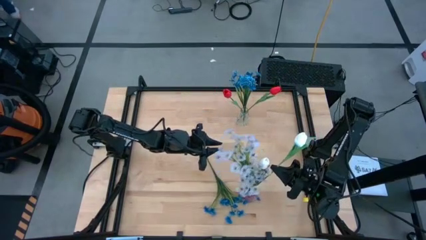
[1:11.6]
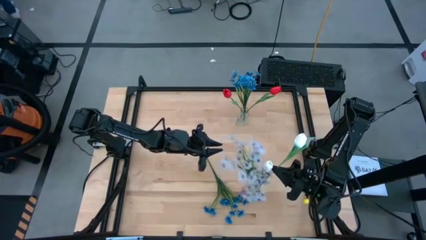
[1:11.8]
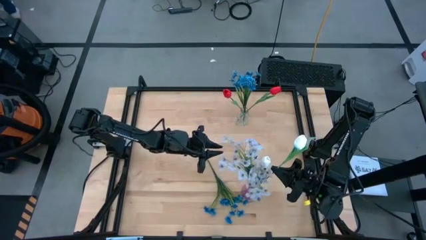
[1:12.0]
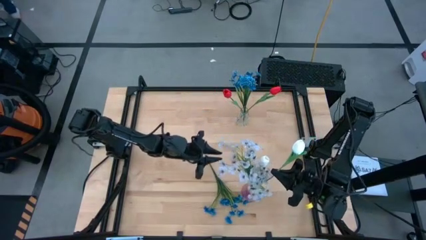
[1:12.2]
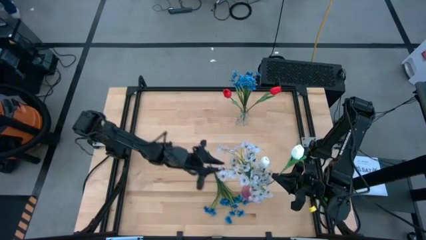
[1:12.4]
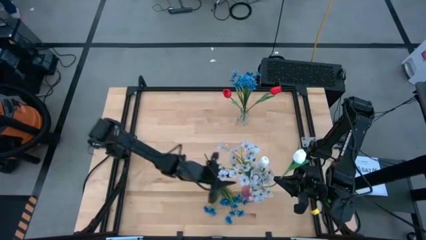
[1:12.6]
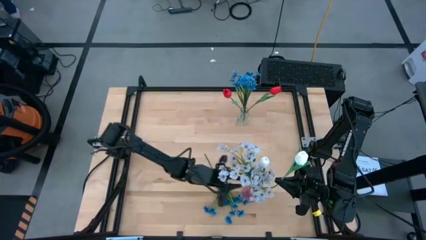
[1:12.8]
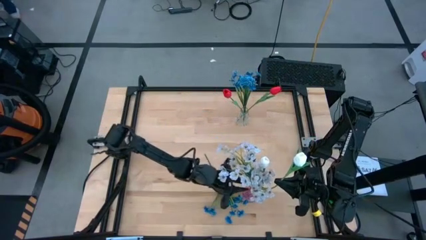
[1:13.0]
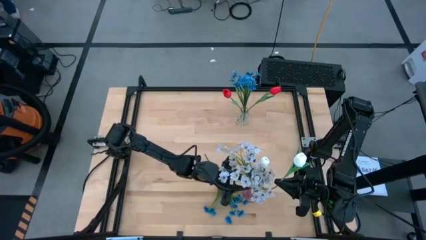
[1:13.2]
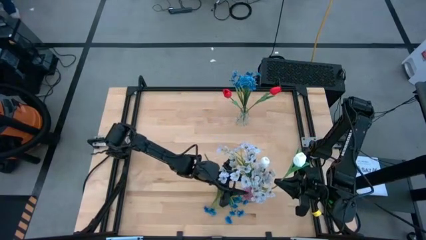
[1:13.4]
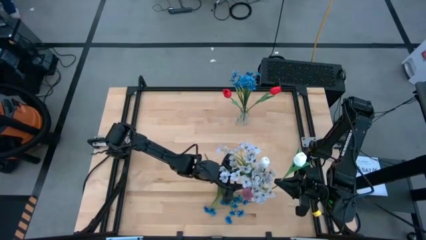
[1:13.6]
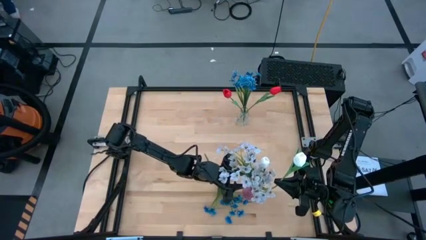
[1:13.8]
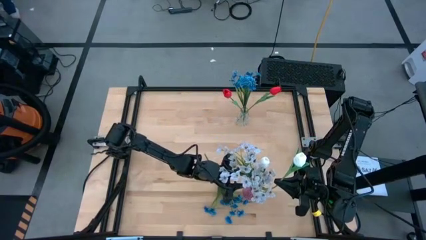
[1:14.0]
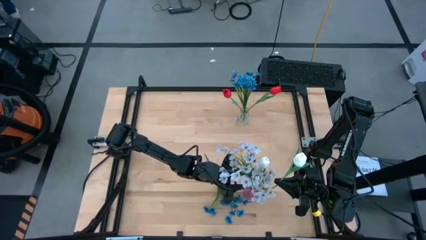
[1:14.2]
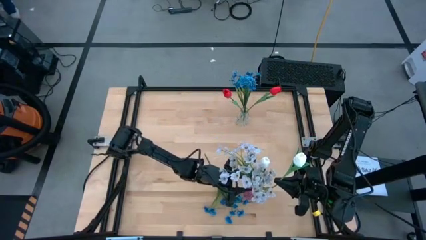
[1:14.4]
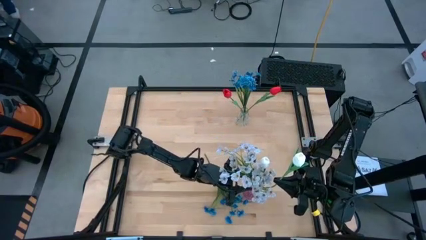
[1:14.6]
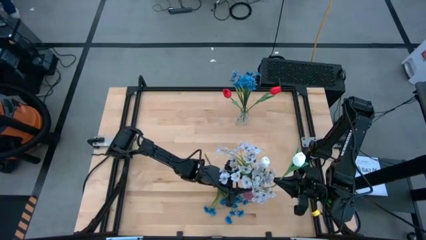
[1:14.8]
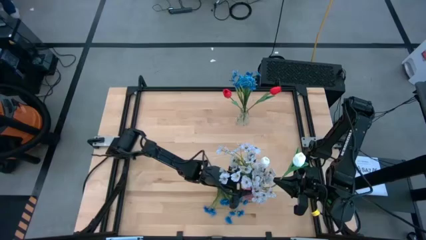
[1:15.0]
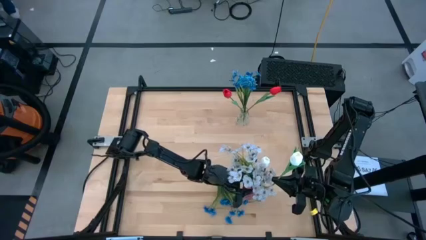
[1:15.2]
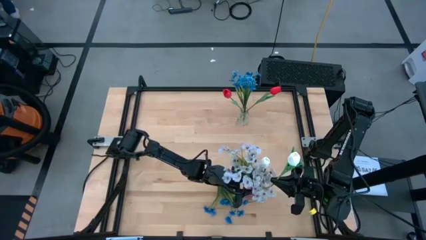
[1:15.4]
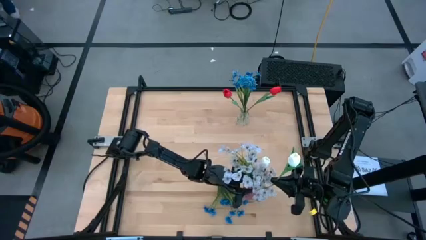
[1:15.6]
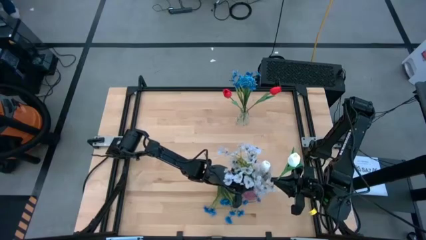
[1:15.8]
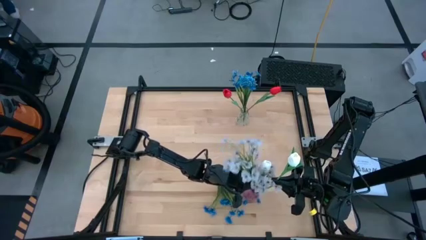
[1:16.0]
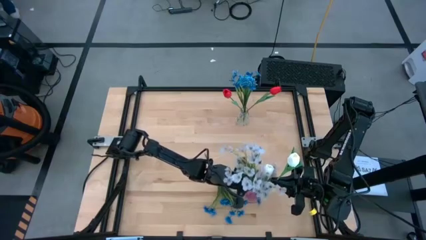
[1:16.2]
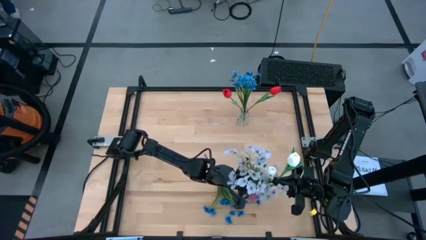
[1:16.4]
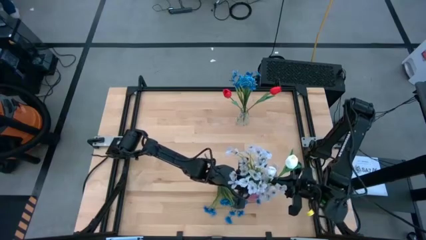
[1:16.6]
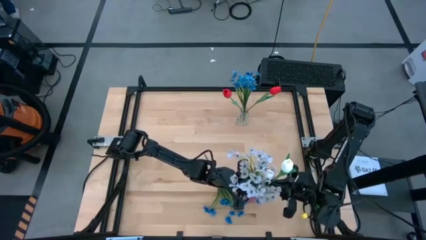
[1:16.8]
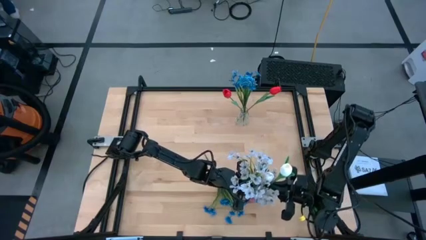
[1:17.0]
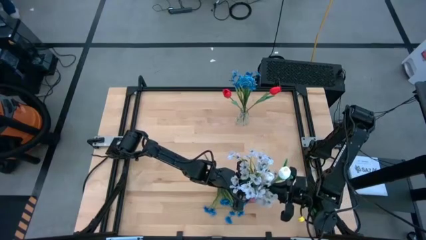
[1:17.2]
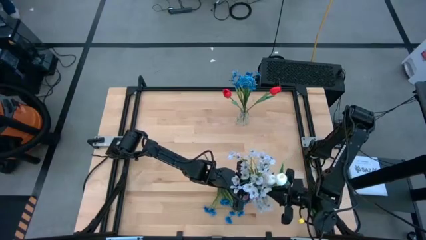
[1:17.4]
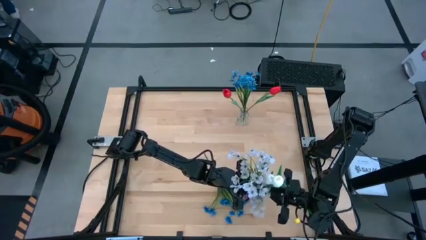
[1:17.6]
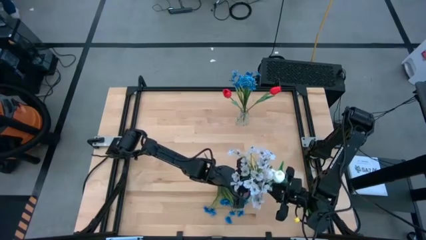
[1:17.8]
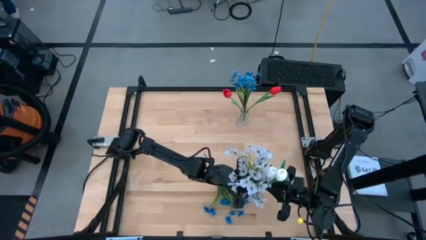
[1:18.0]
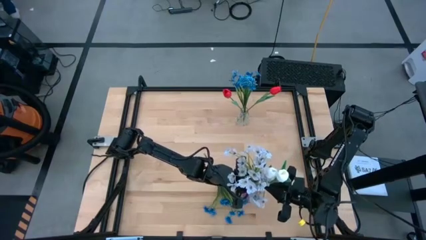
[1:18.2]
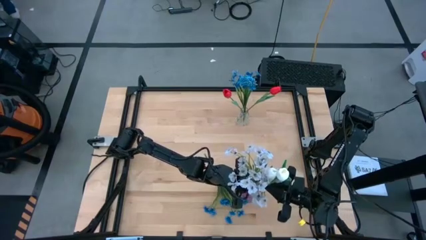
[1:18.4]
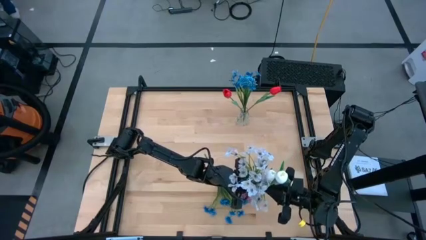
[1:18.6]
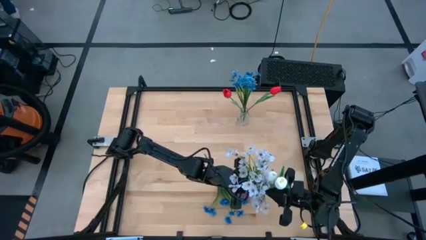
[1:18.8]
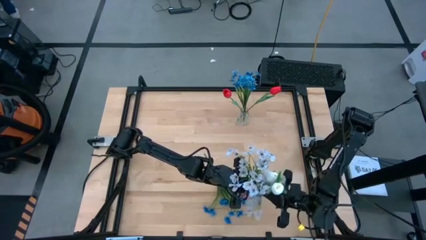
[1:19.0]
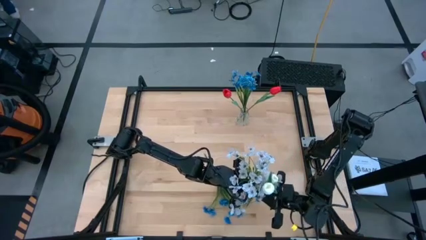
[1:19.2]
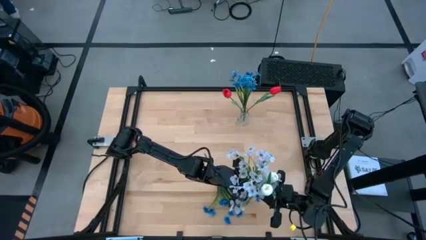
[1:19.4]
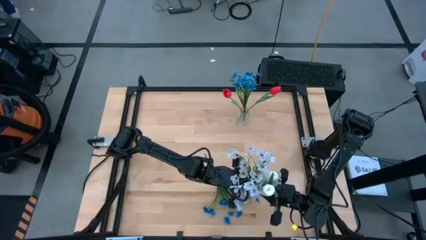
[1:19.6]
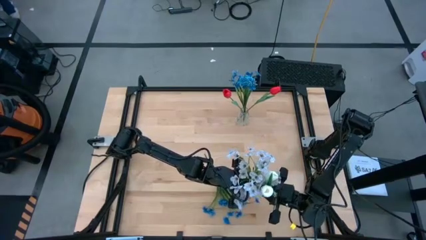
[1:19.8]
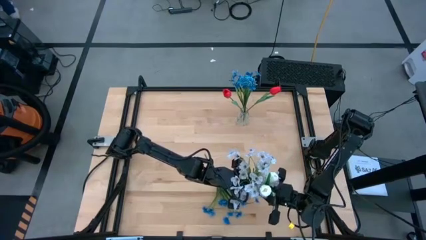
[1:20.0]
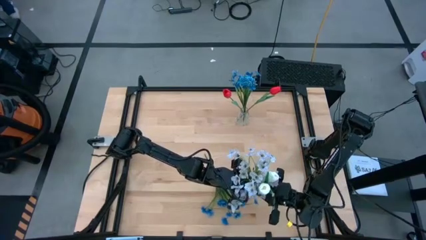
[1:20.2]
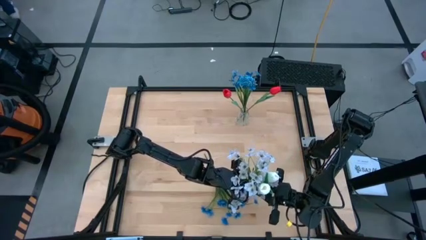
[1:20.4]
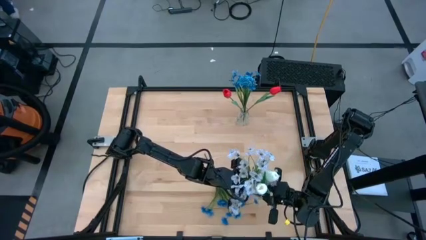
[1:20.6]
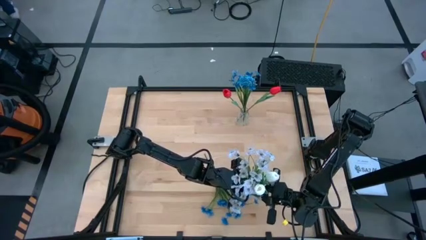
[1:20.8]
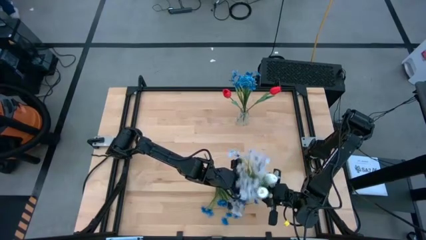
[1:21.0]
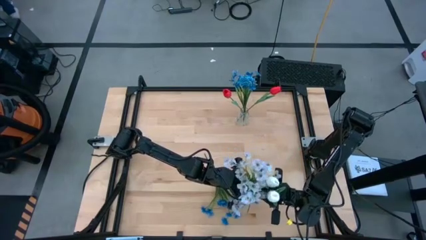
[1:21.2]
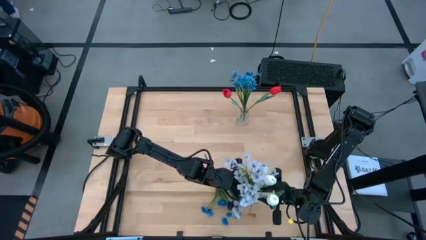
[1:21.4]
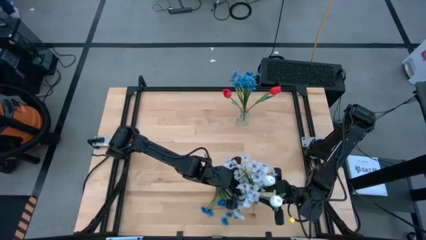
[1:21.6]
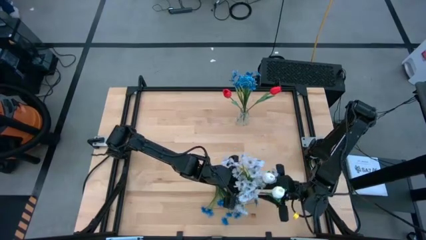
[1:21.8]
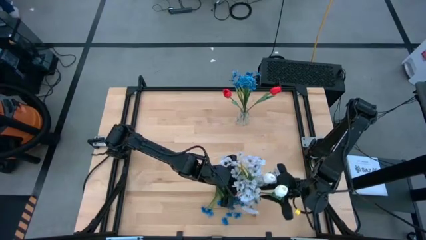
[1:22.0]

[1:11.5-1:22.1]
Task: Sort flowers into vase by color
Put the white flower into the violet transparent vase

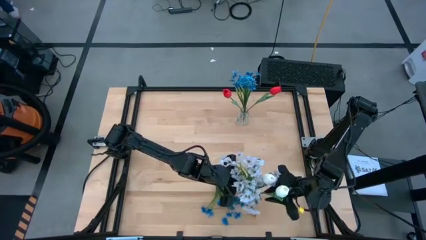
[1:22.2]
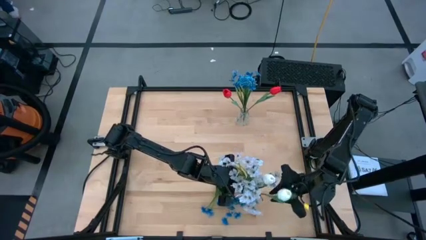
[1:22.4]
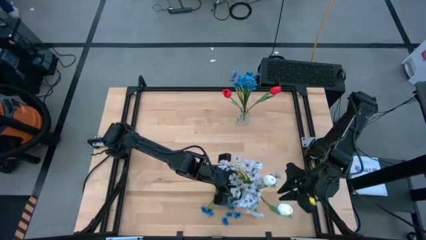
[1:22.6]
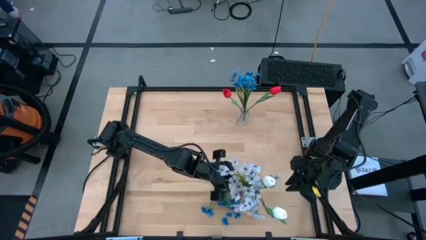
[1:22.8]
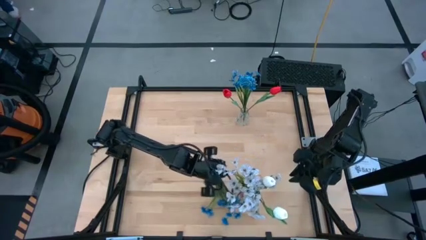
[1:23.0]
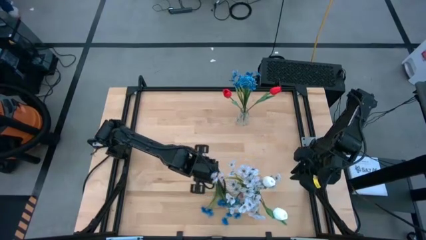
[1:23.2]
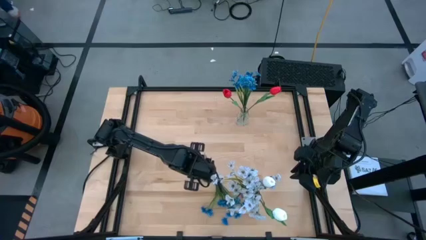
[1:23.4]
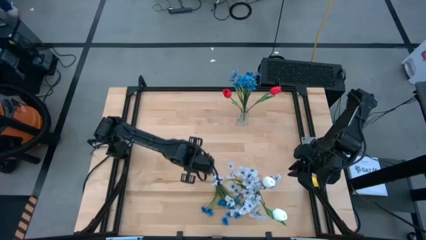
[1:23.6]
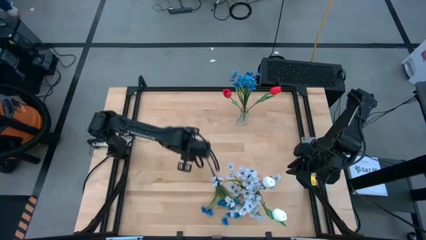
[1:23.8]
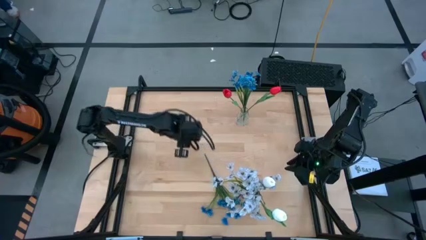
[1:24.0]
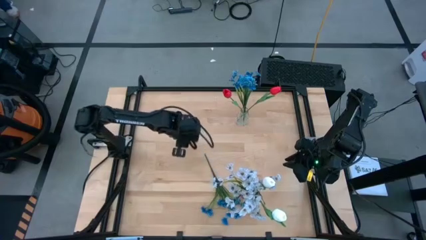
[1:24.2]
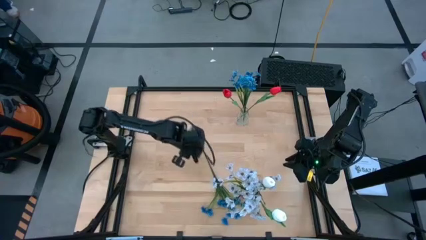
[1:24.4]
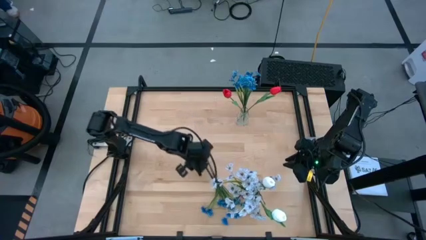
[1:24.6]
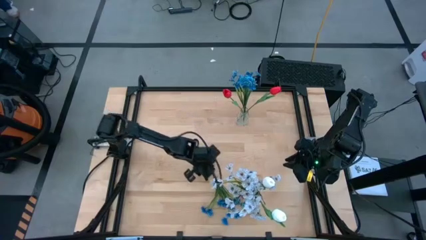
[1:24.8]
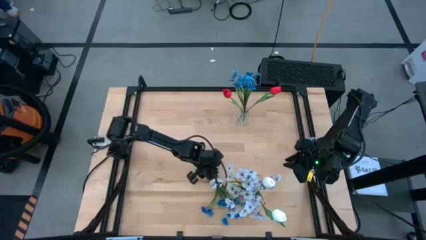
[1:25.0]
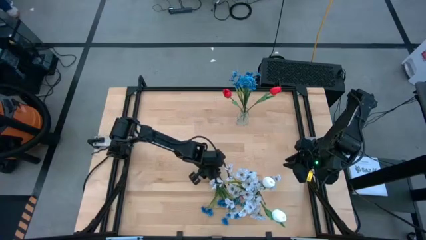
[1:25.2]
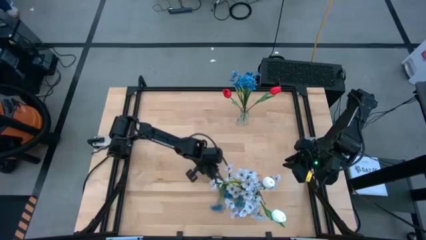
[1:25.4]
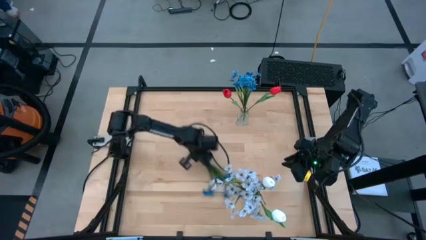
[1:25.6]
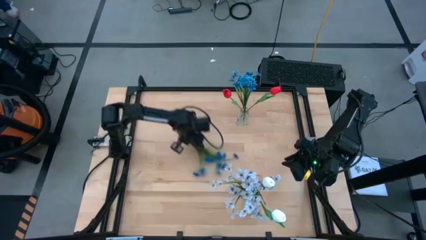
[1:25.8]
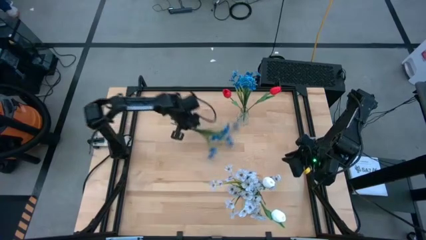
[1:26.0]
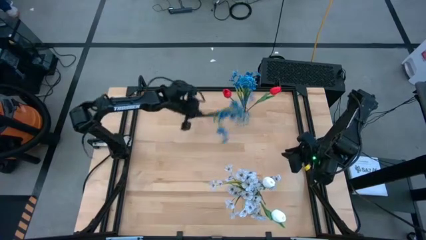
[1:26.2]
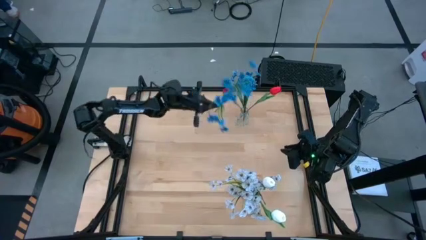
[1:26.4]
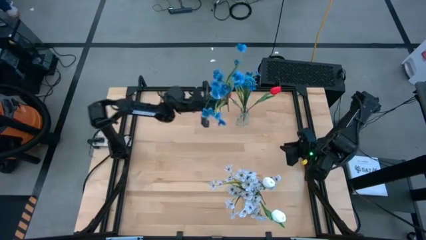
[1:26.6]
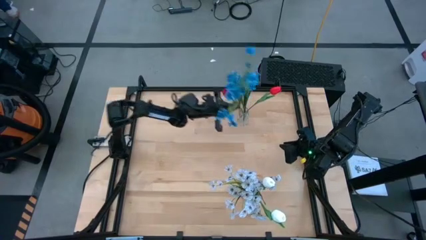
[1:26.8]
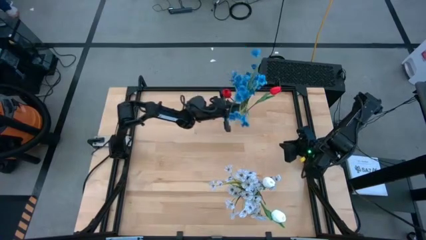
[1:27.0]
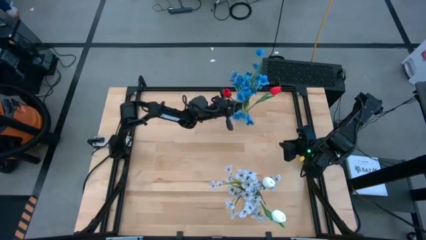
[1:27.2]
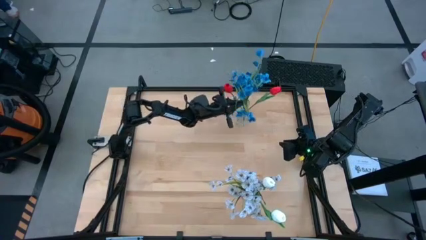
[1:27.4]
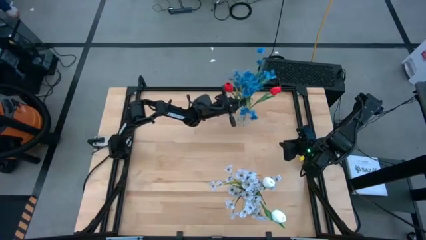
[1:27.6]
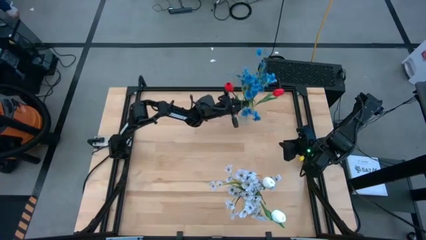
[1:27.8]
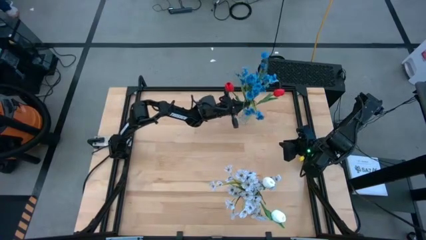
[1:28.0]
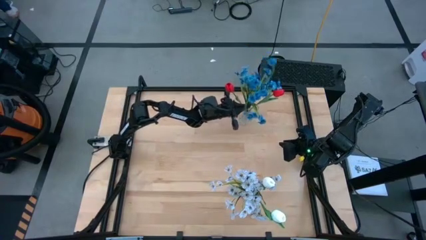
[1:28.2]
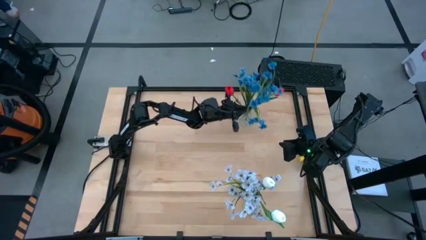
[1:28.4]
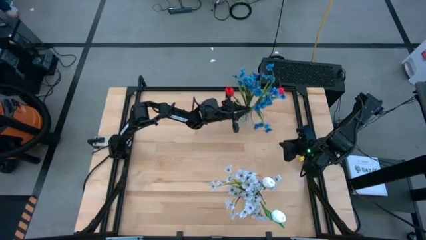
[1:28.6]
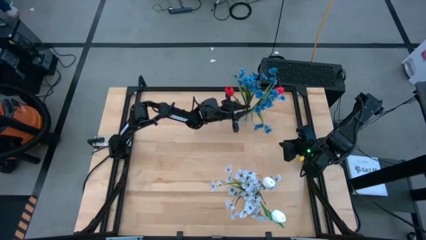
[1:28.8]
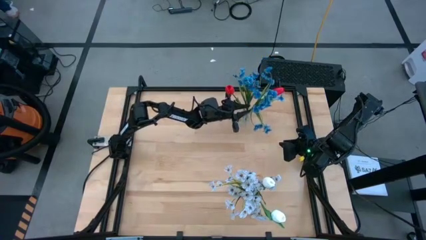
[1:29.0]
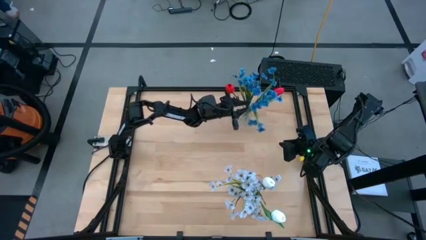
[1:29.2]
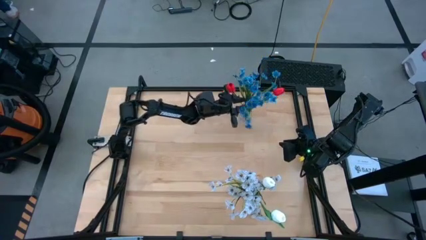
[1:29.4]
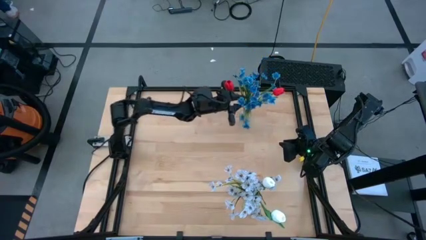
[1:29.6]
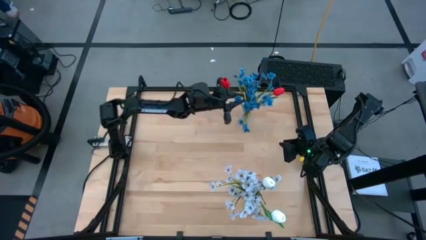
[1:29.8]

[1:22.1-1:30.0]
Put the blue flowers into the transparent vase
